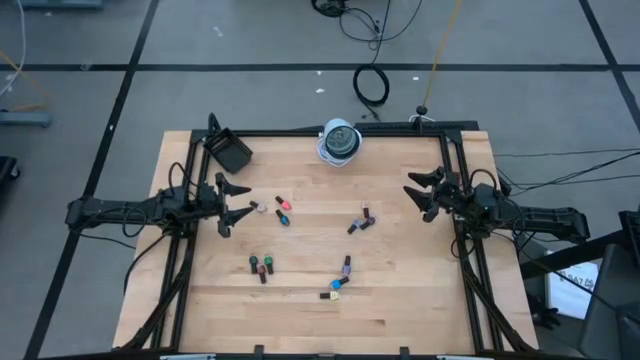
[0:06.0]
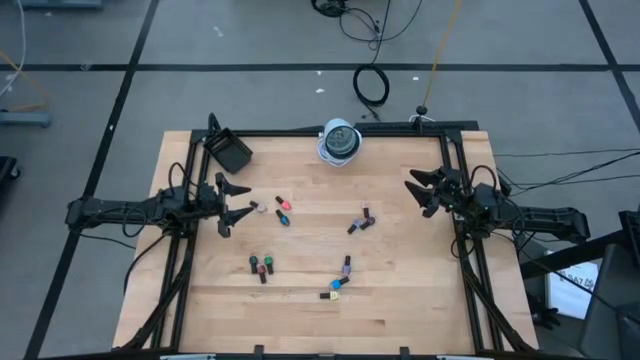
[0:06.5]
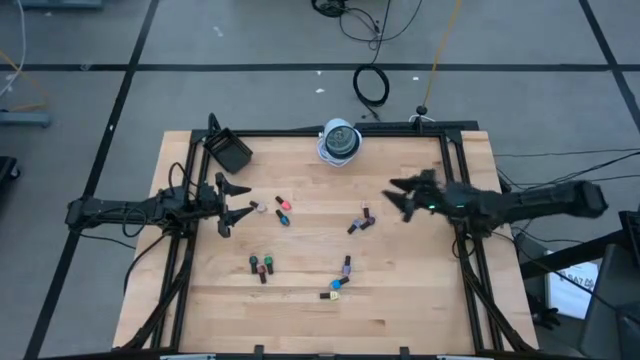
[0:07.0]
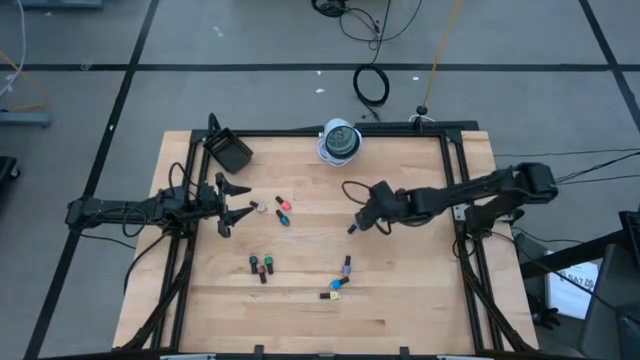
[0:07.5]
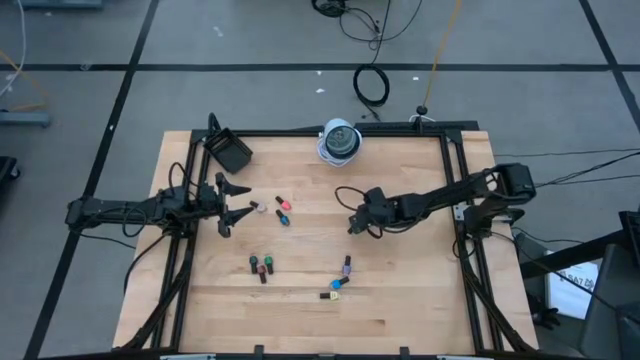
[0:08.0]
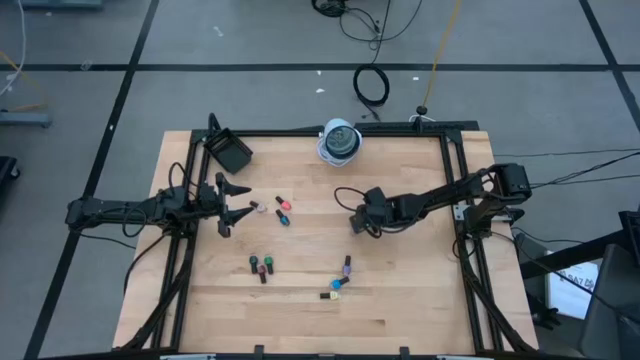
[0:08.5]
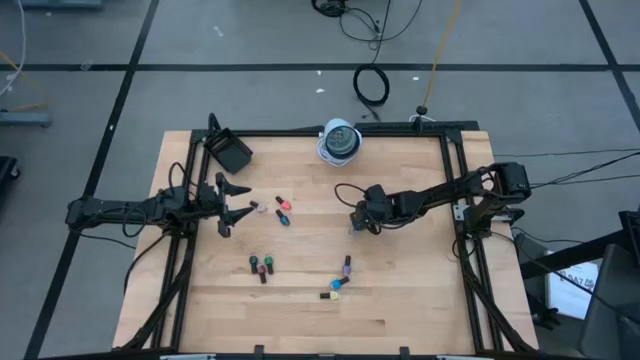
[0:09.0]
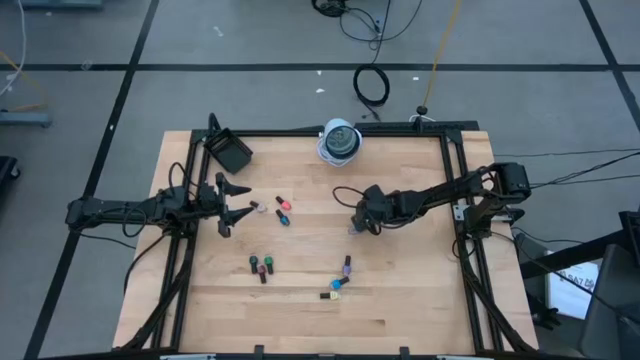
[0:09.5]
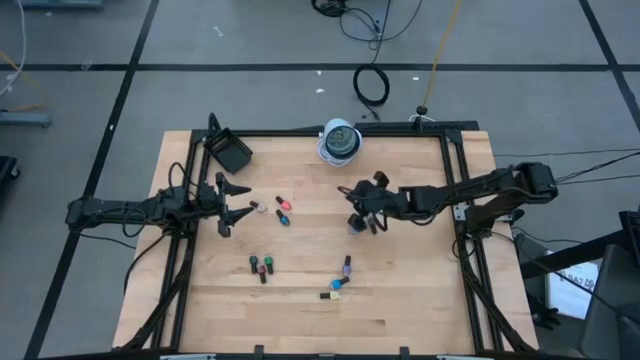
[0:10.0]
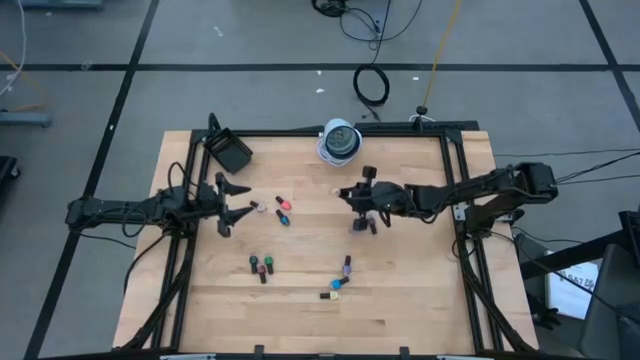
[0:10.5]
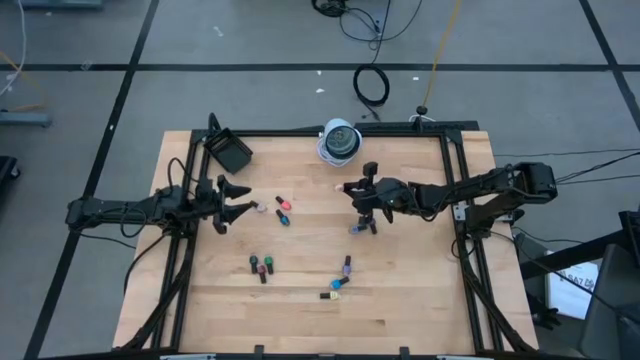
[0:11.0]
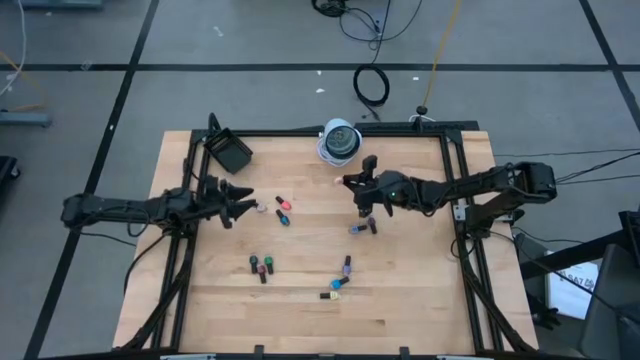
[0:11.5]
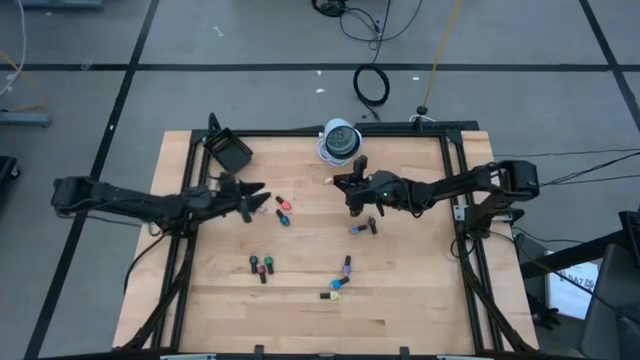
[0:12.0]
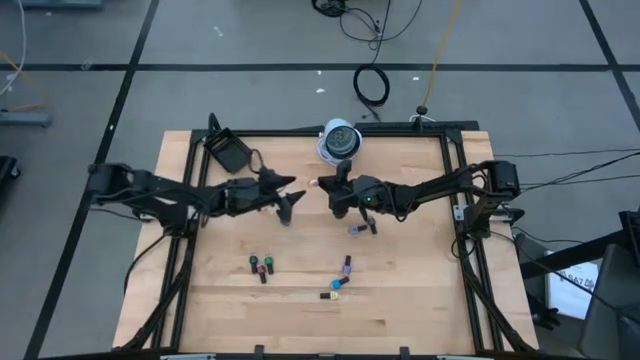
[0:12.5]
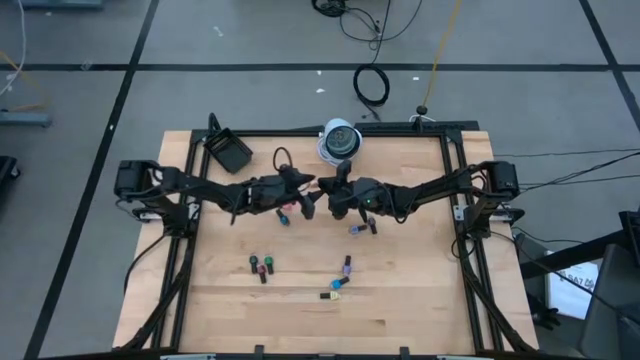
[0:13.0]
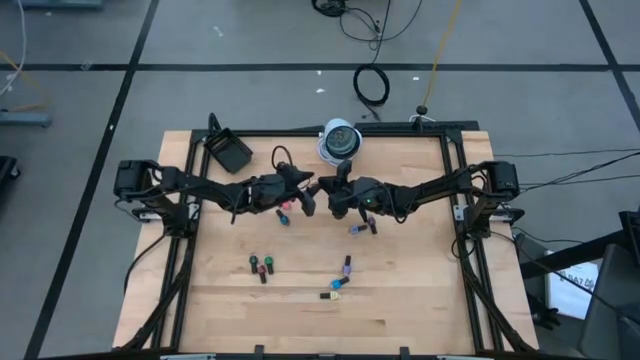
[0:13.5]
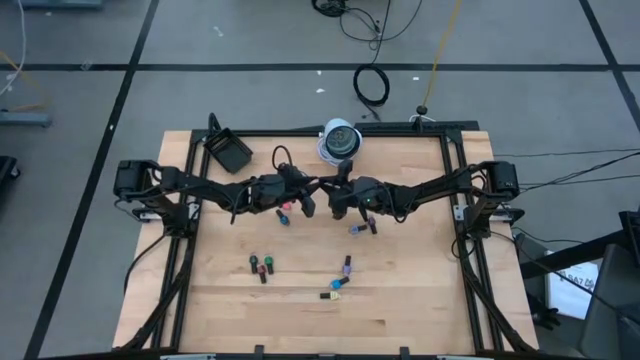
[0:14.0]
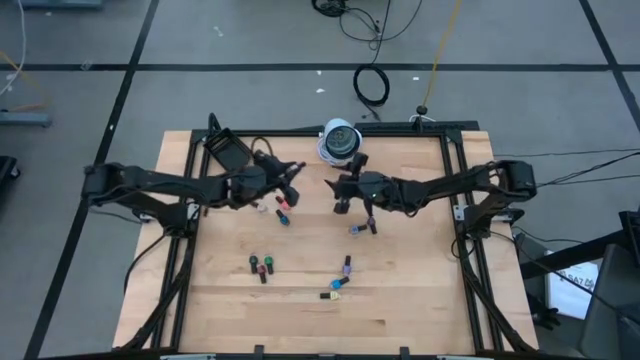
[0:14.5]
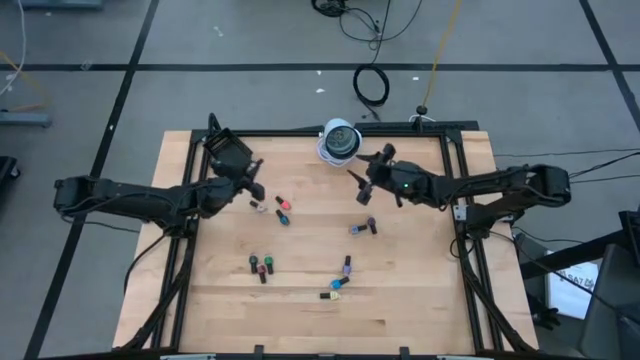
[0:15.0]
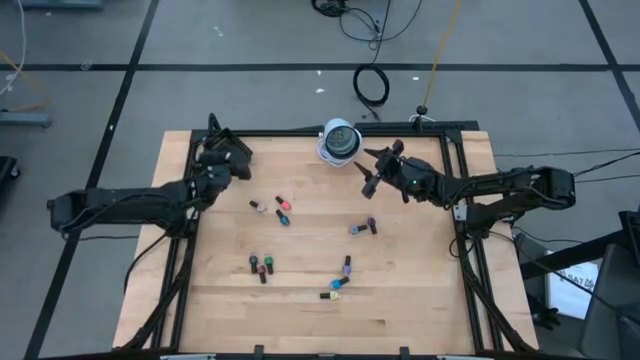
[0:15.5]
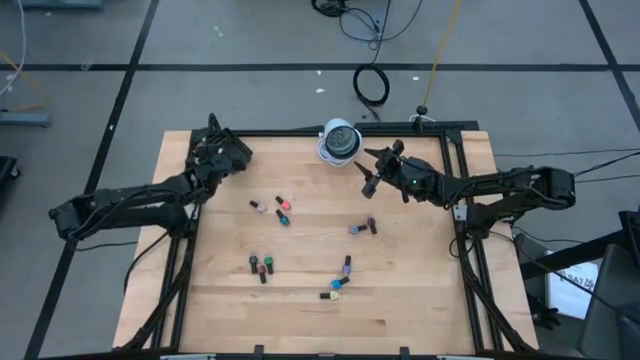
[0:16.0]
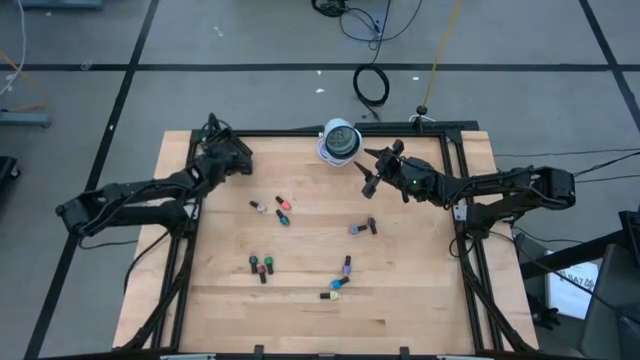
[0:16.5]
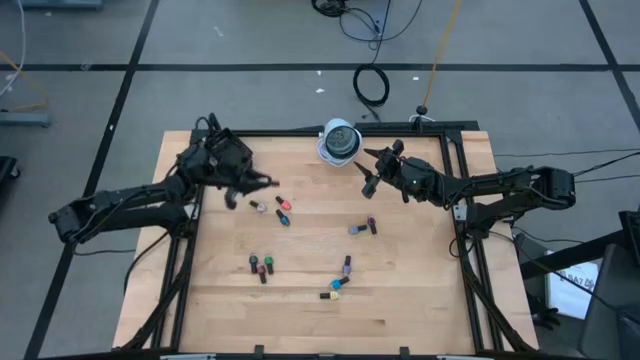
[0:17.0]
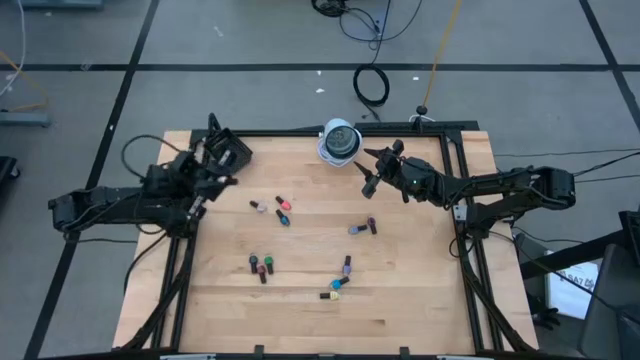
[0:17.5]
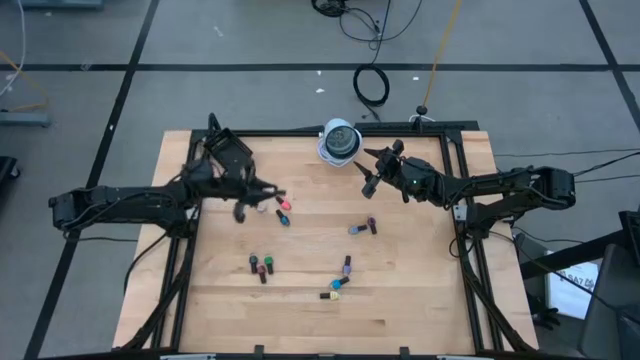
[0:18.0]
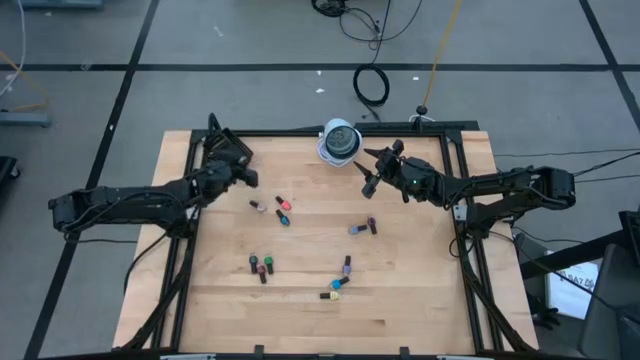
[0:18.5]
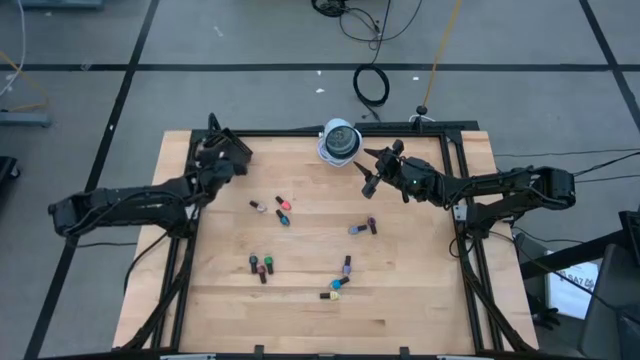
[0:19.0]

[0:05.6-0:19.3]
Task: Pick & Place Nail Polish
Put the light pink nail polish bottle into the black basket

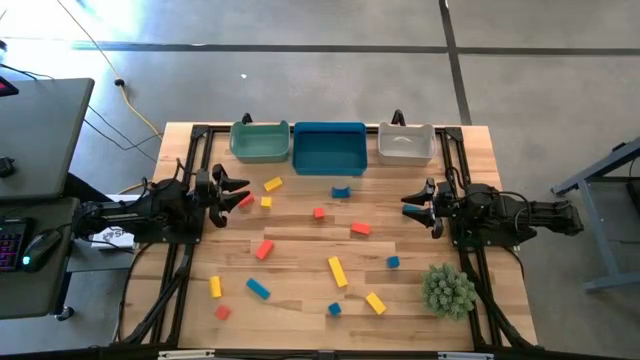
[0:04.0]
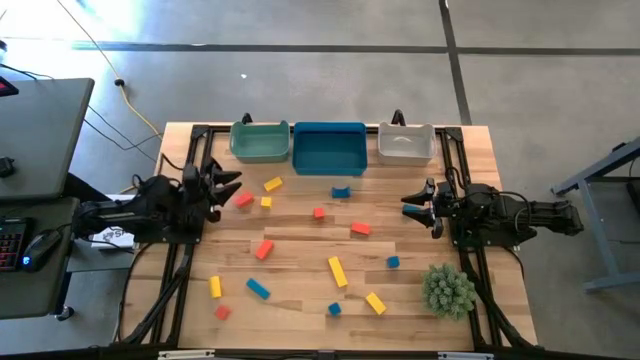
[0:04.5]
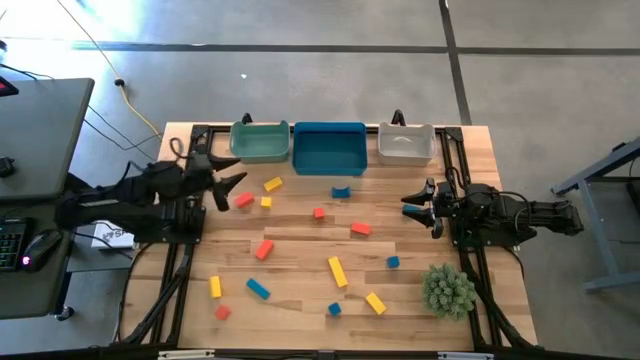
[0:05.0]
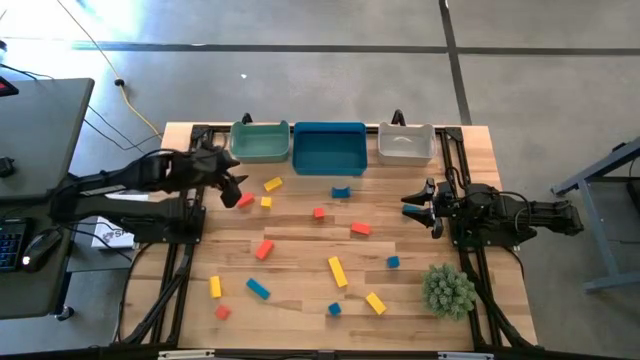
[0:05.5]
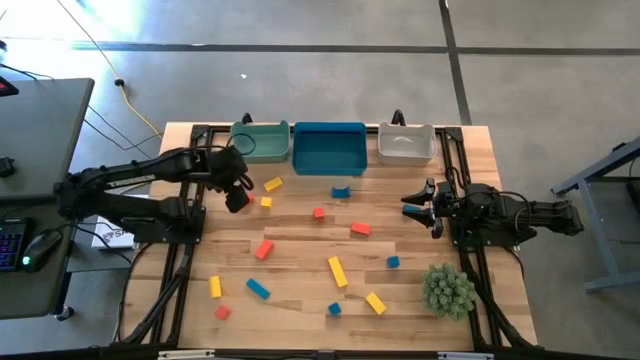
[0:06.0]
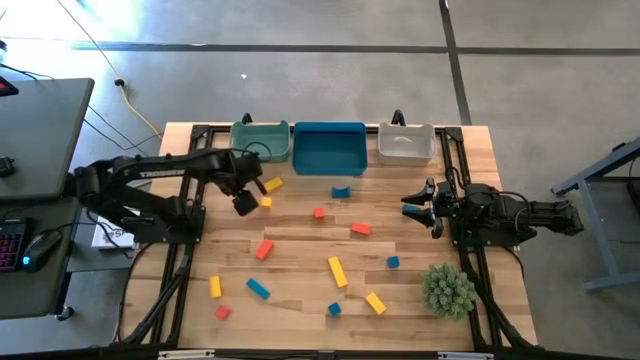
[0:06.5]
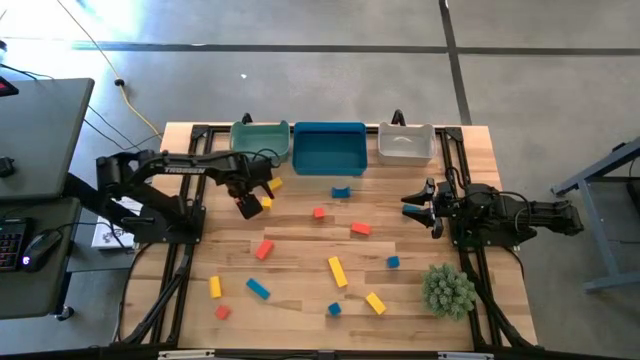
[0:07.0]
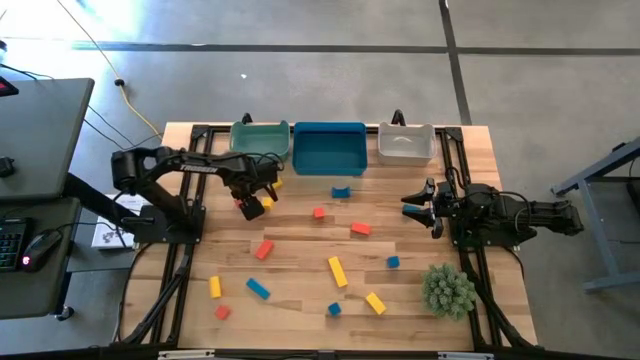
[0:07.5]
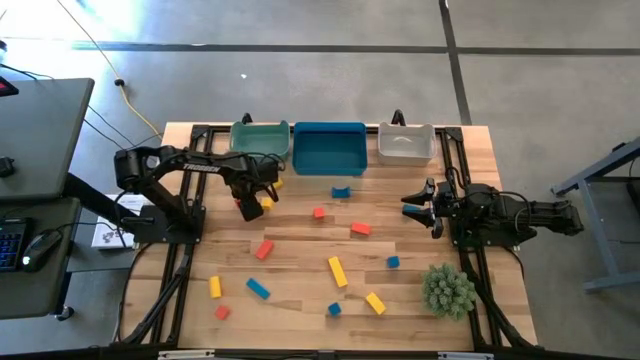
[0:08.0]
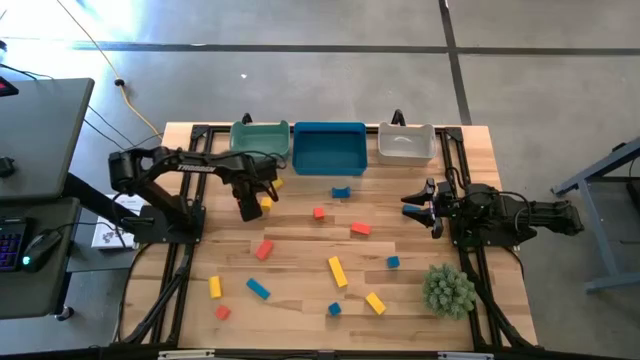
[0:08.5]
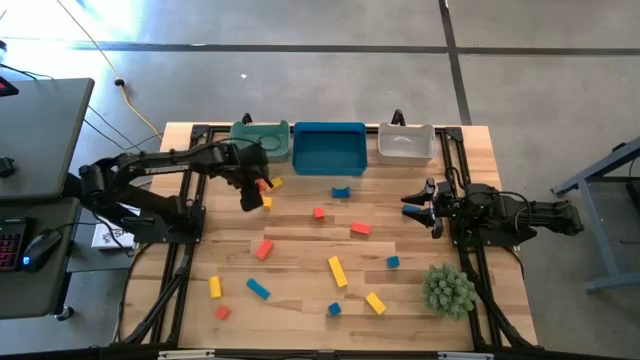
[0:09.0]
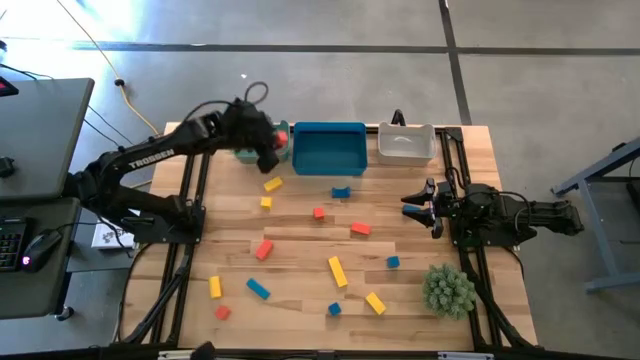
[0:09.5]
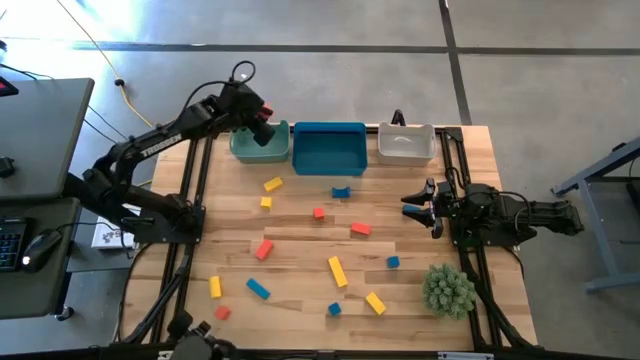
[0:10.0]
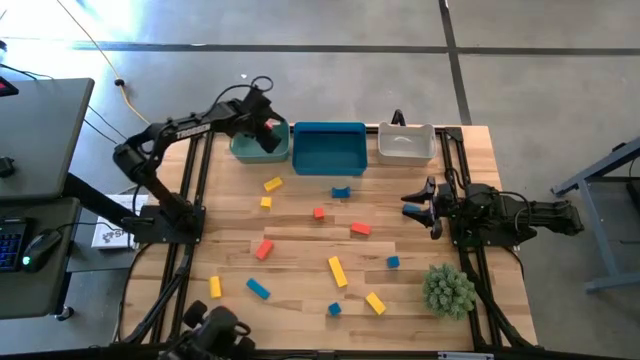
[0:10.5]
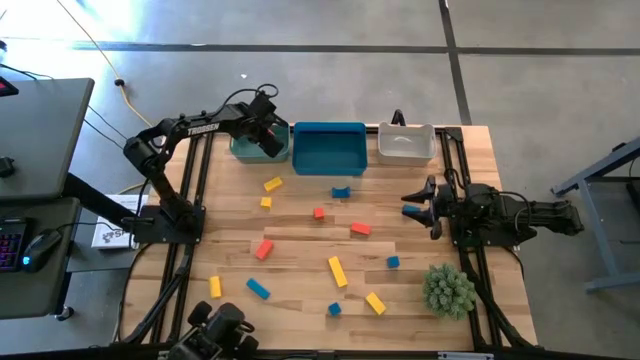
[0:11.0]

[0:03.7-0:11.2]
Task: Sort & place blocks by color
Put the orange block into the green bin
